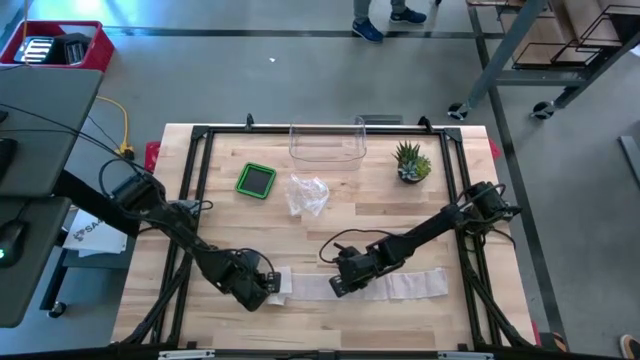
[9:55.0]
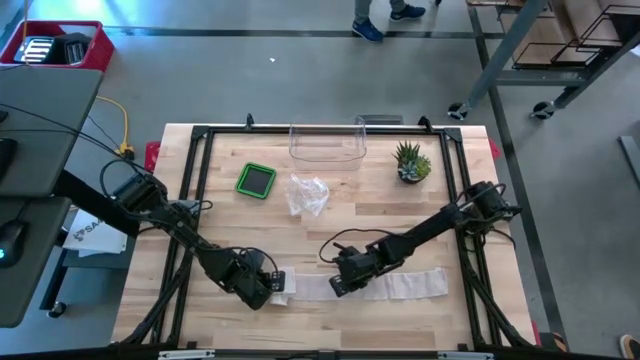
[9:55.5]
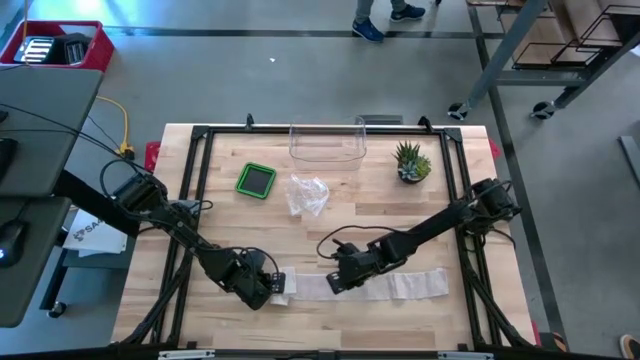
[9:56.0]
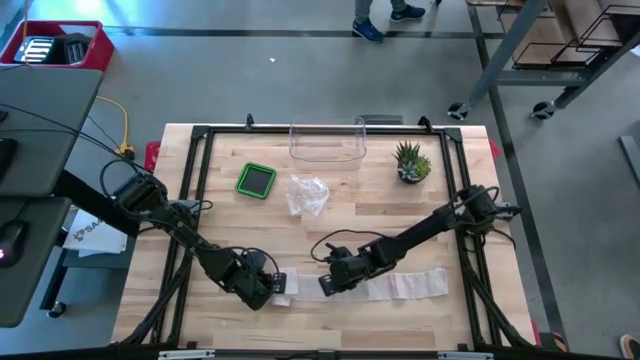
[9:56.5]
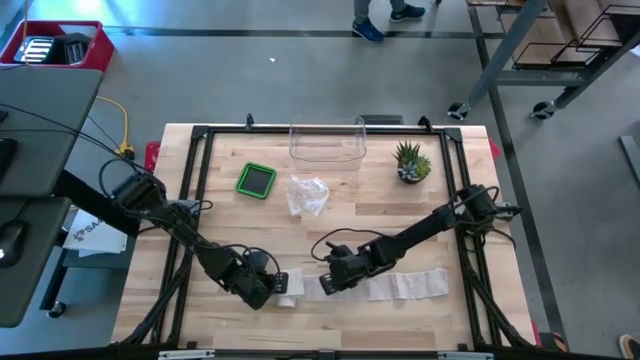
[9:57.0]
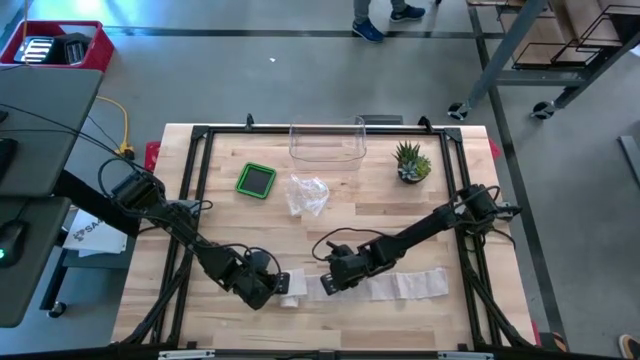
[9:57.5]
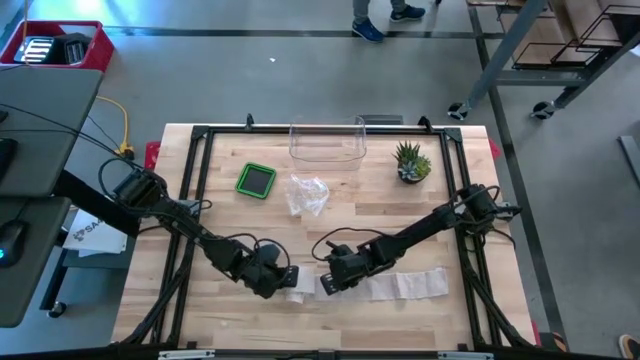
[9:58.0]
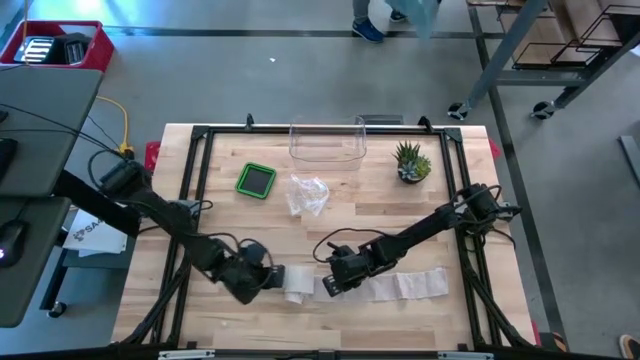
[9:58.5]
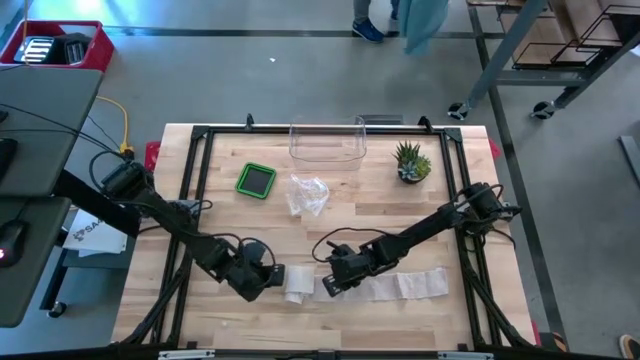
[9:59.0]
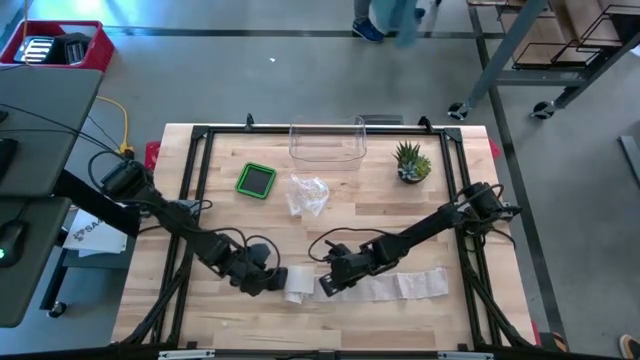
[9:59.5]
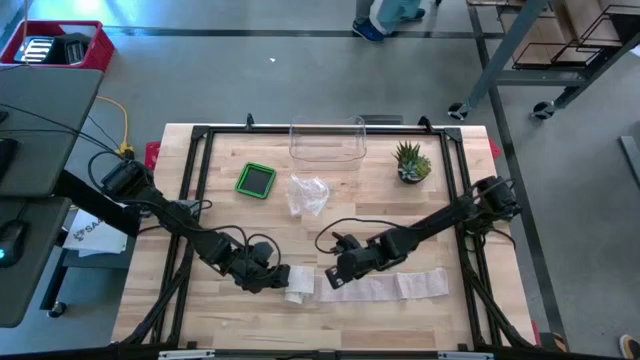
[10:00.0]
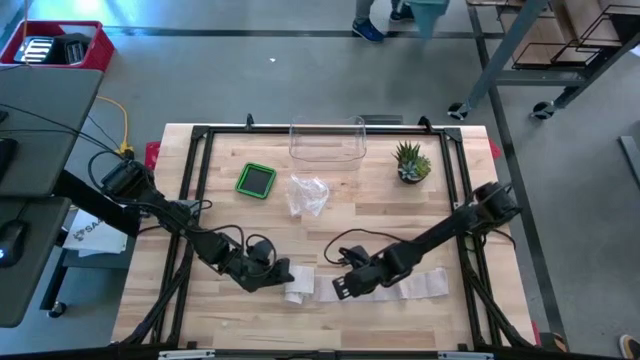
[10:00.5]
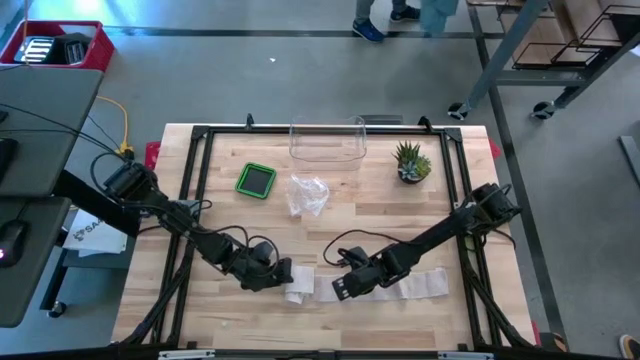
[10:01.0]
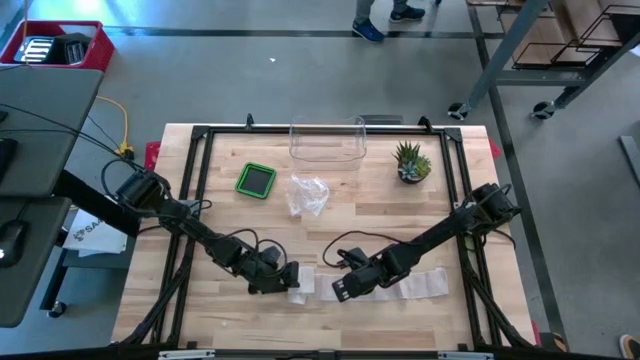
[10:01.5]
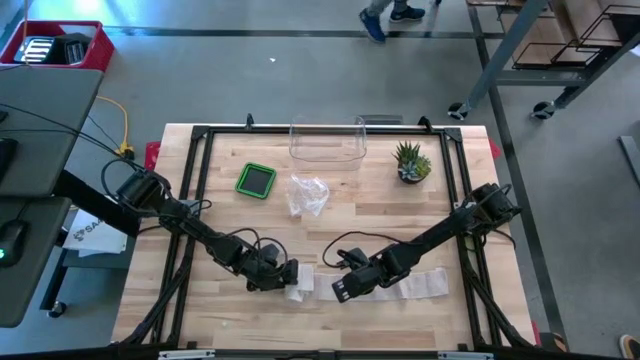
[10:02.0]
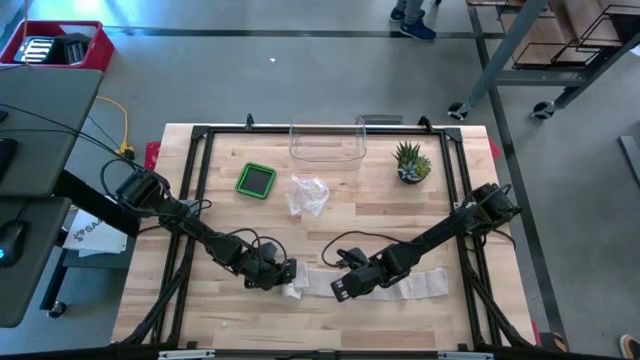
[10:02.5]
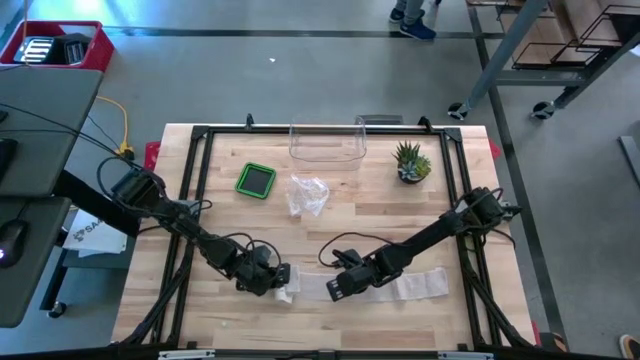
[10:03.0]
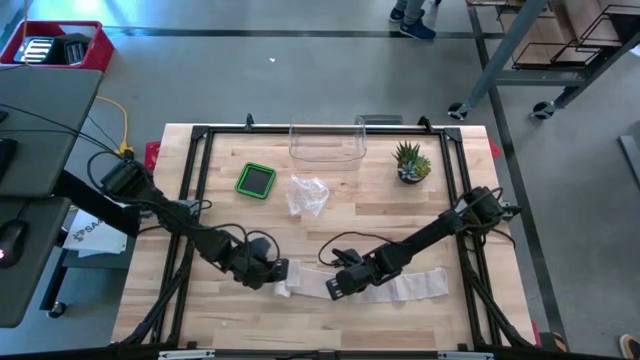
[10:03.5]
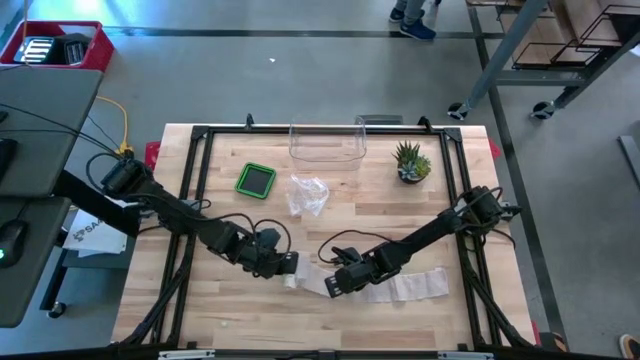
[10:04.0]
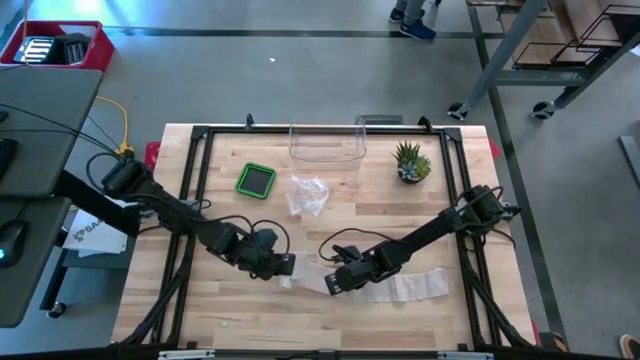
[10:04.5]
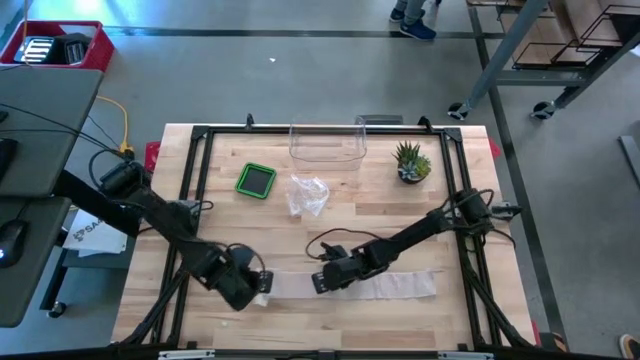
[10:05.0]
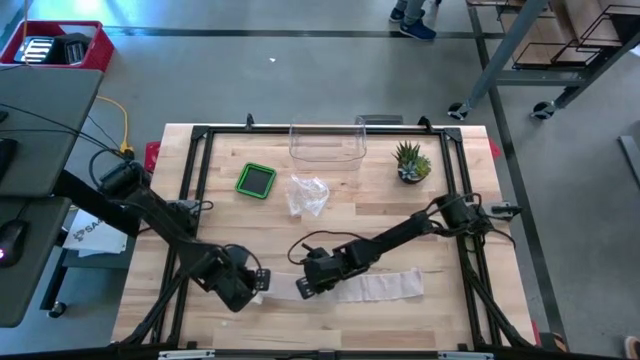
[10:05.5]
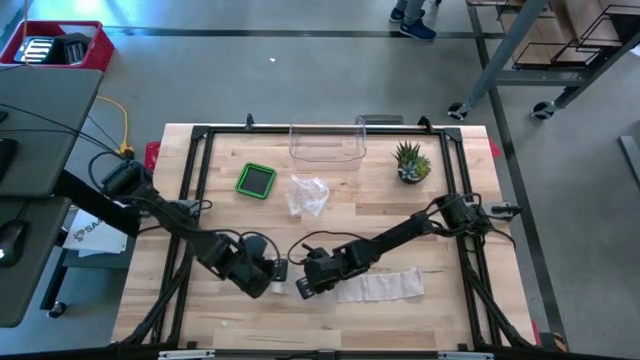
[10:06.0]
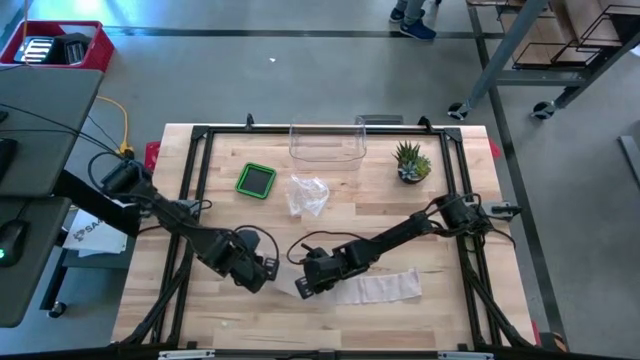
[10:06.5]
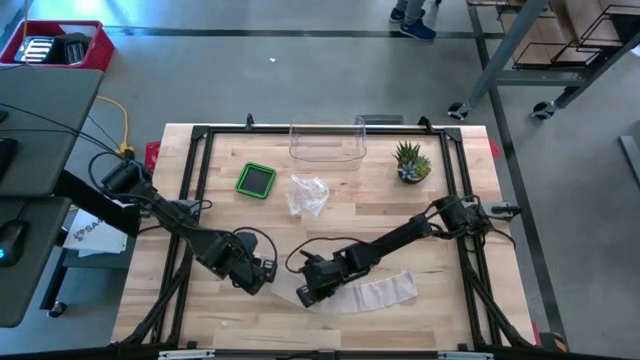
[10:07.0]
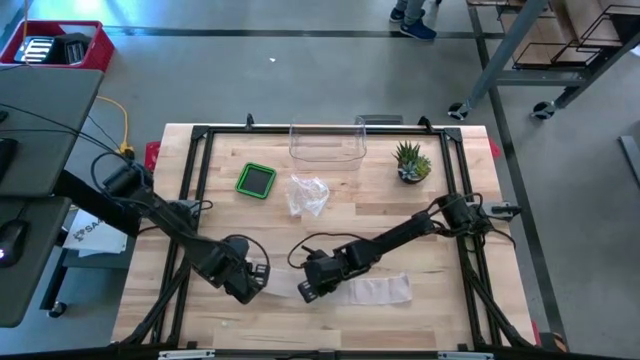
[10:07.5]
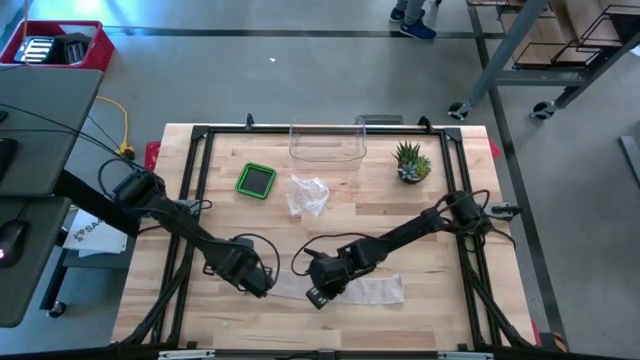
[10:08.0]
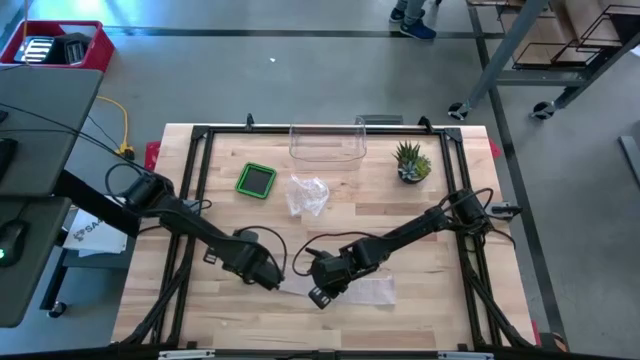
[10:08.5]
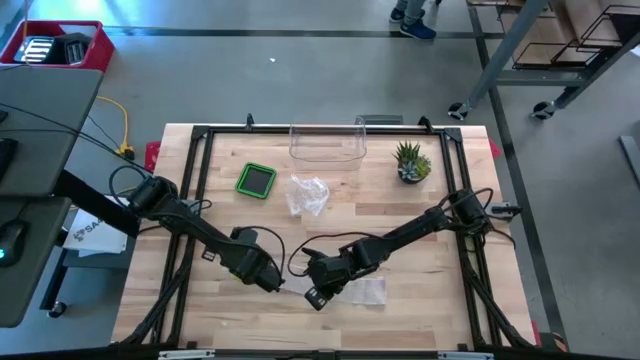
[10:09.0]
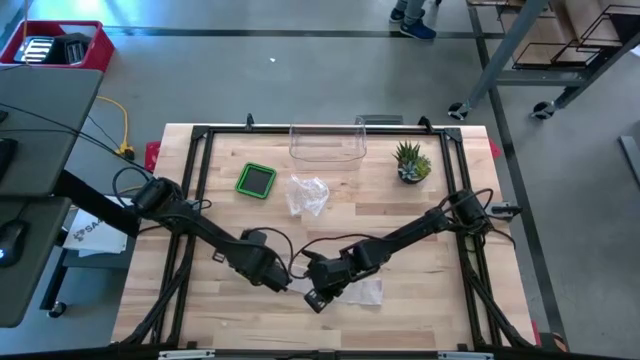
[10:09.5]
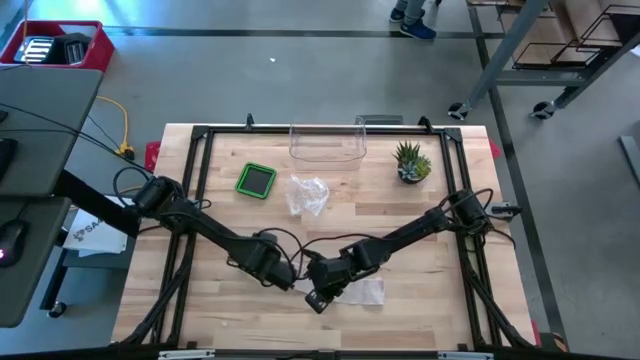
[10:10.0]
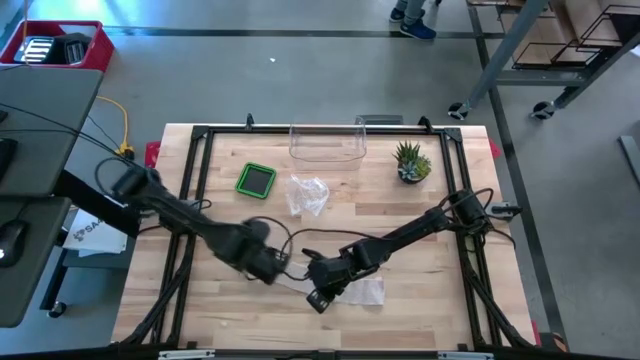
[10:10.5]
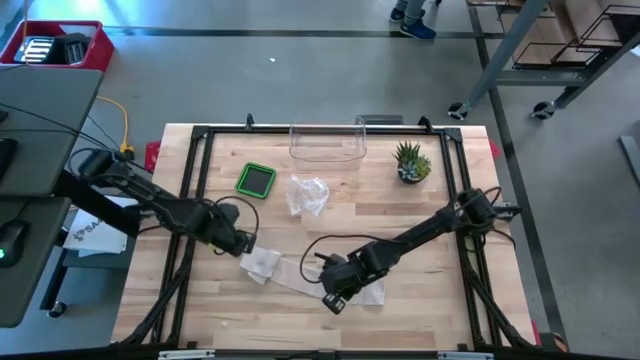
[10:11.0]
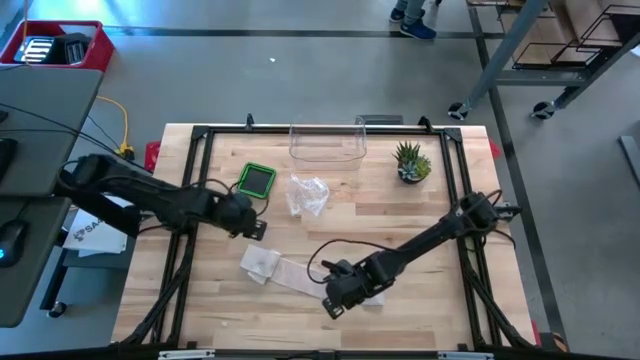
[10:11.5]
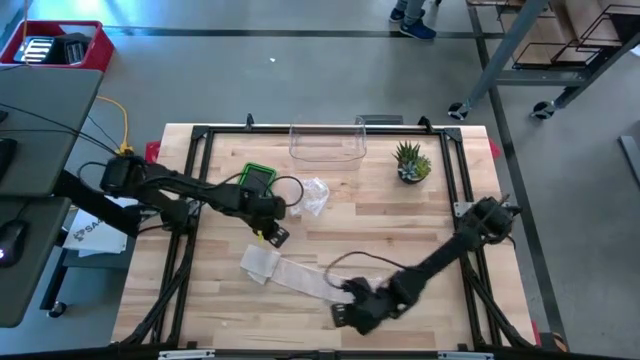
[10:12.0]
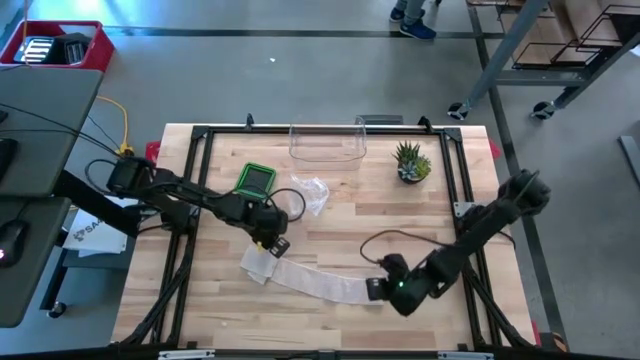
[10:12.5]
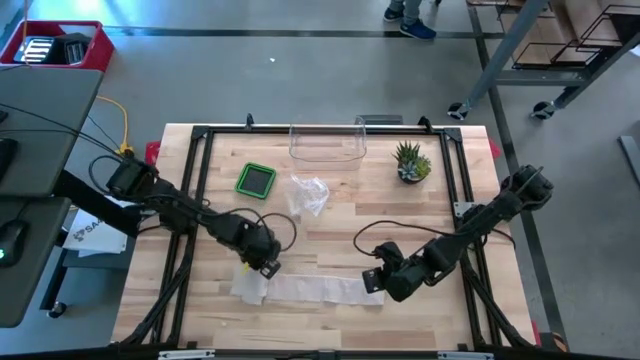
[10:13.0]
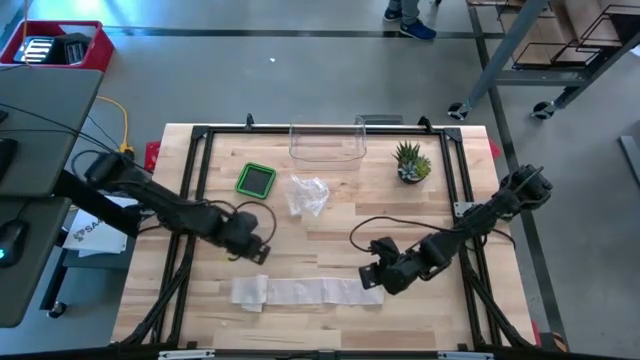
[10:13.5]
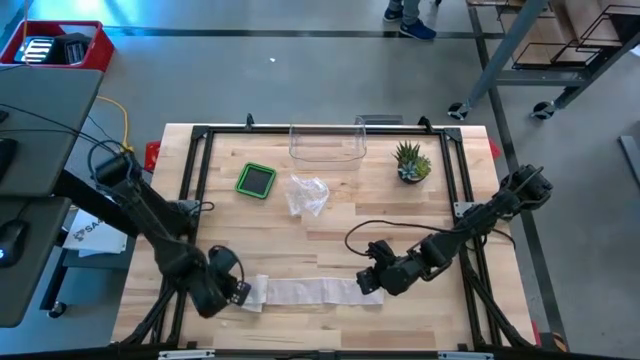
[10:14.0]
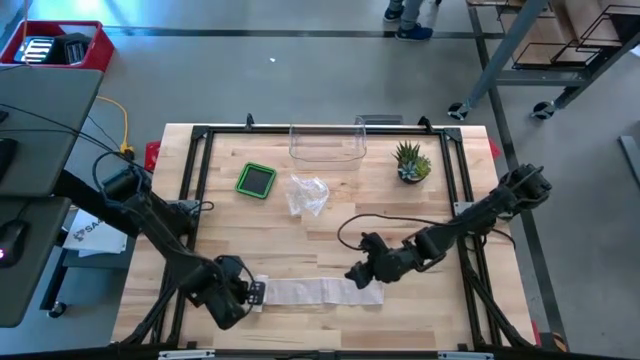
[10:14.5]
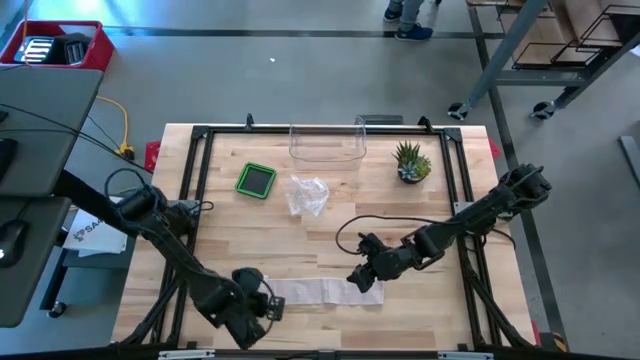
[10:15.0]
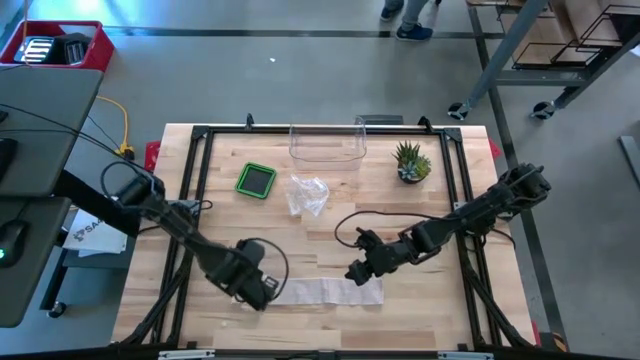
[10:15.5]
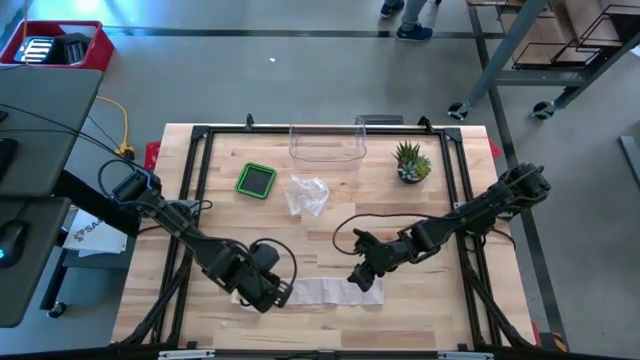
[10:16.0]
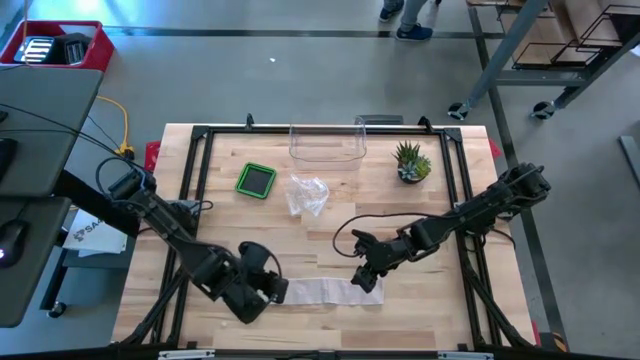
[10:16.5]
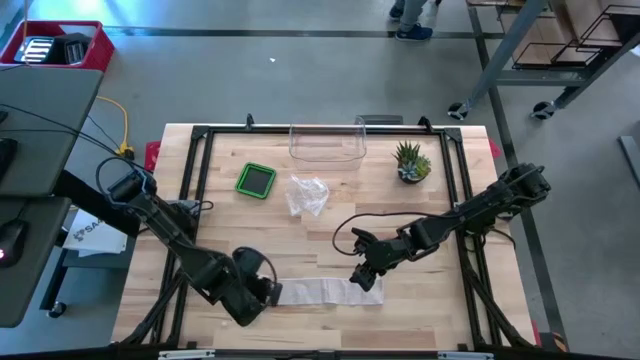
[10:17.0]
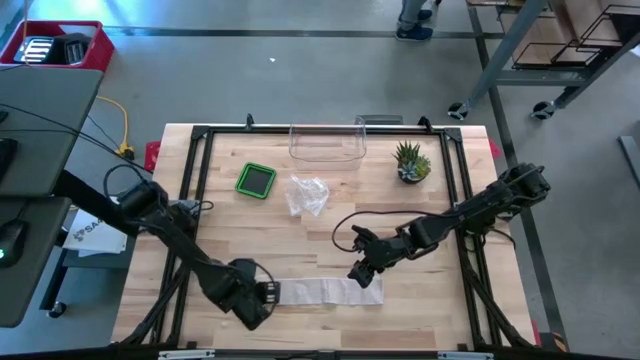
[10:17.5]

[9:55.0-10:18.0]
Task: Roll bandage
Roll the bandage
